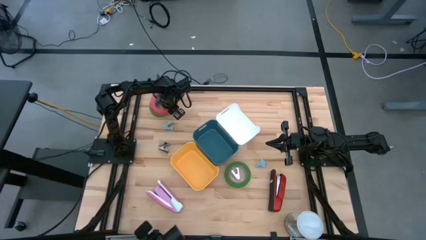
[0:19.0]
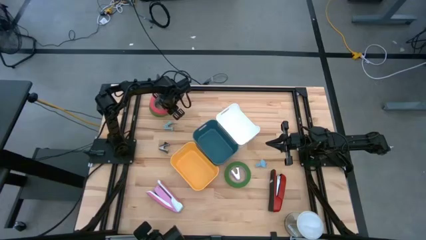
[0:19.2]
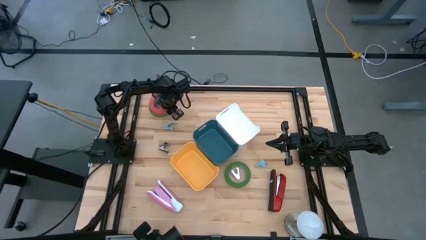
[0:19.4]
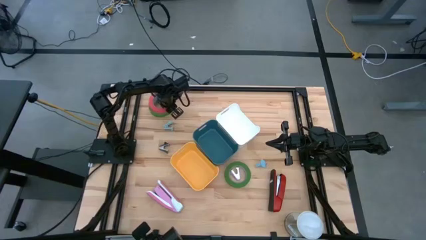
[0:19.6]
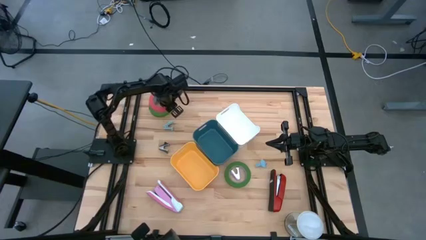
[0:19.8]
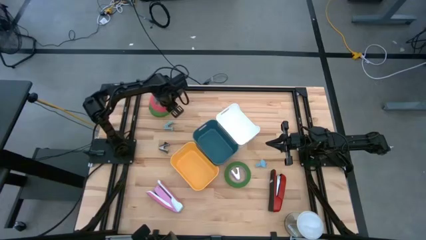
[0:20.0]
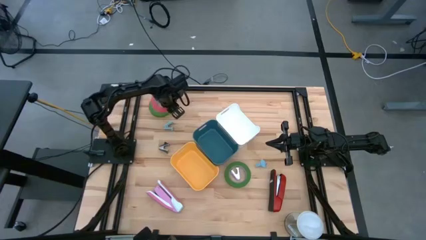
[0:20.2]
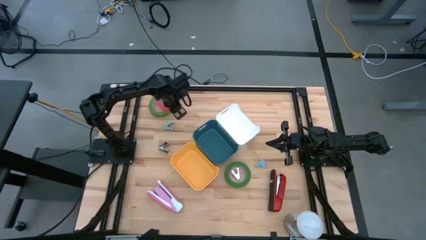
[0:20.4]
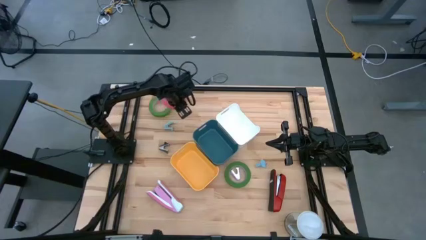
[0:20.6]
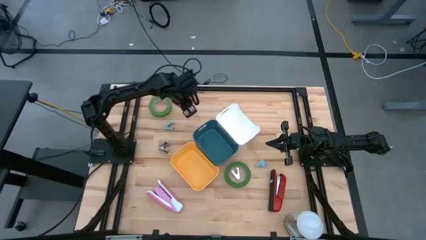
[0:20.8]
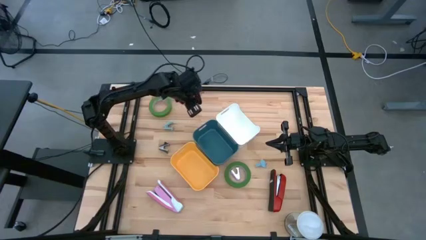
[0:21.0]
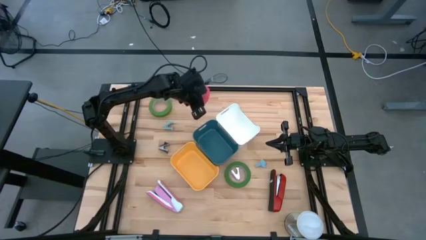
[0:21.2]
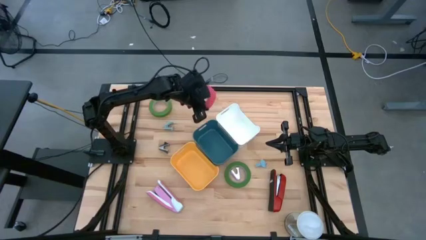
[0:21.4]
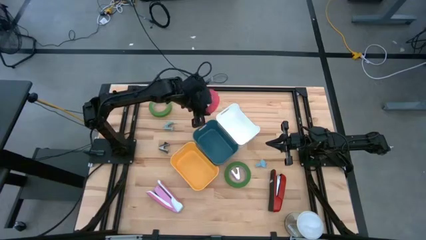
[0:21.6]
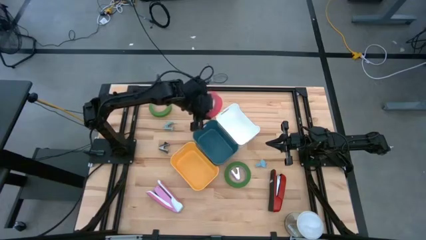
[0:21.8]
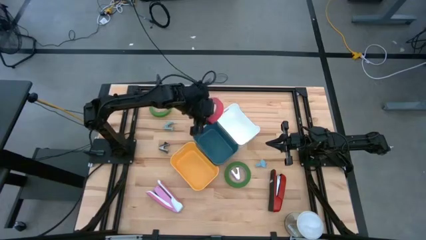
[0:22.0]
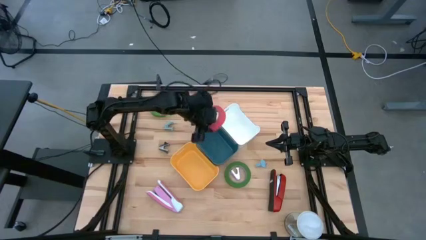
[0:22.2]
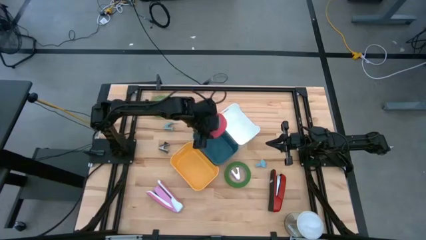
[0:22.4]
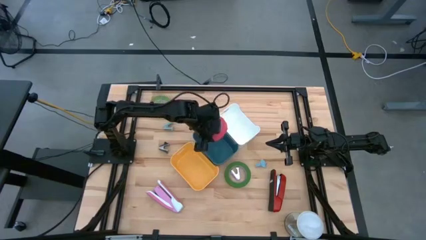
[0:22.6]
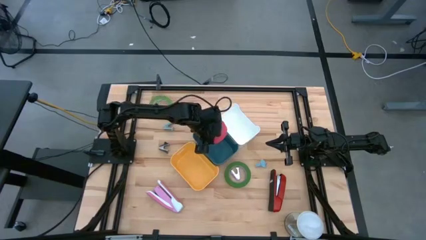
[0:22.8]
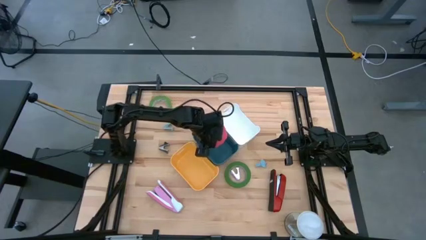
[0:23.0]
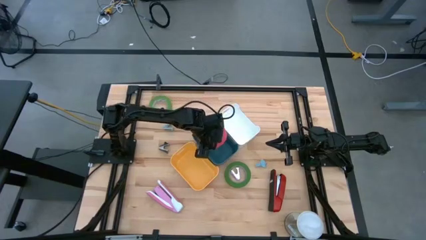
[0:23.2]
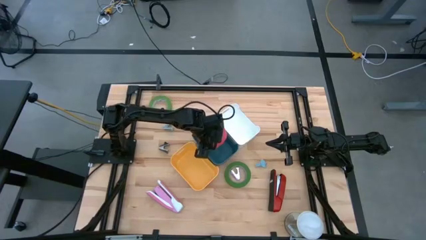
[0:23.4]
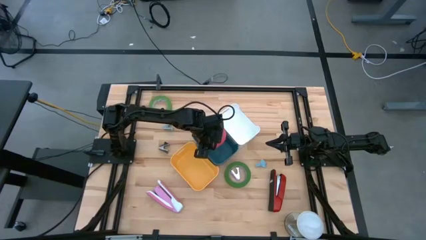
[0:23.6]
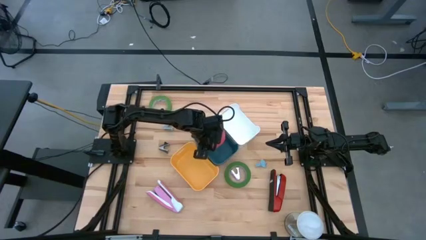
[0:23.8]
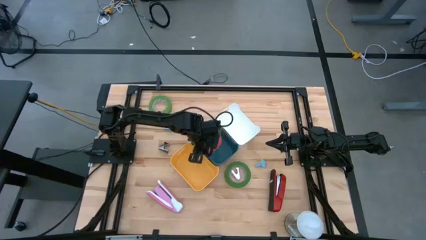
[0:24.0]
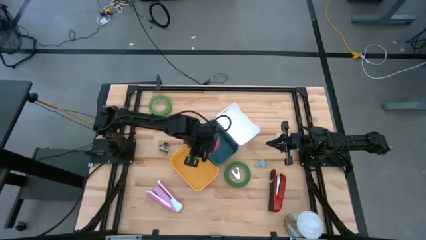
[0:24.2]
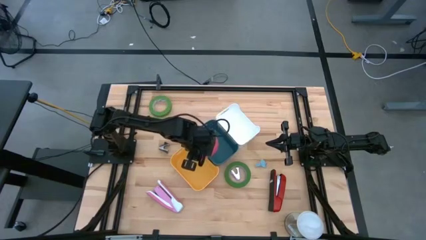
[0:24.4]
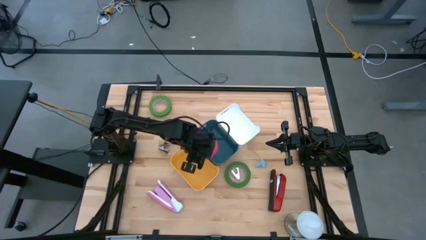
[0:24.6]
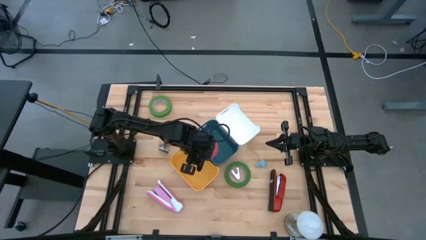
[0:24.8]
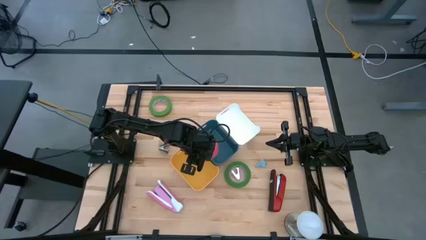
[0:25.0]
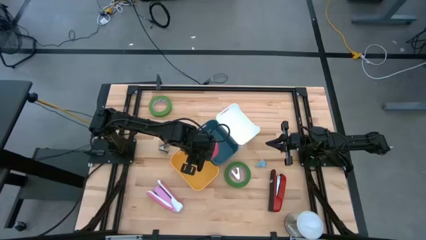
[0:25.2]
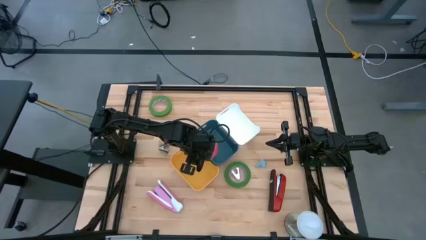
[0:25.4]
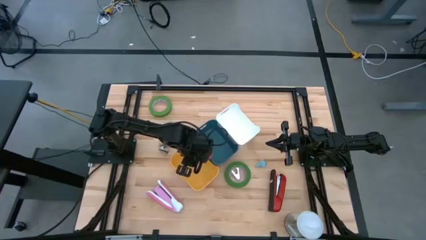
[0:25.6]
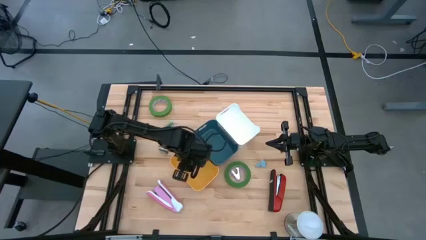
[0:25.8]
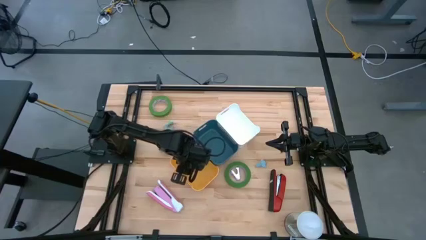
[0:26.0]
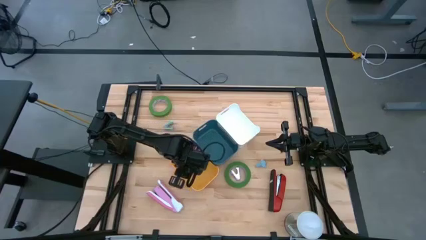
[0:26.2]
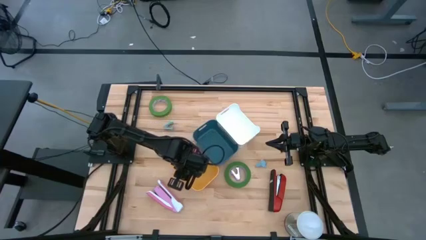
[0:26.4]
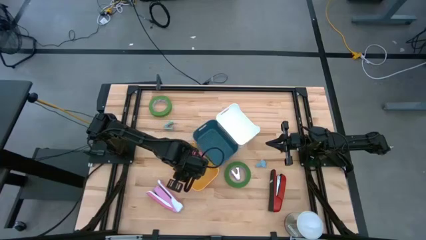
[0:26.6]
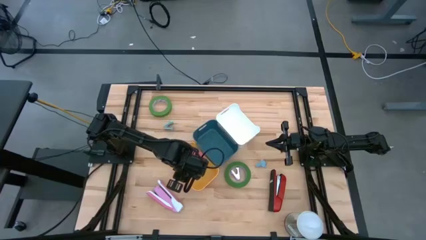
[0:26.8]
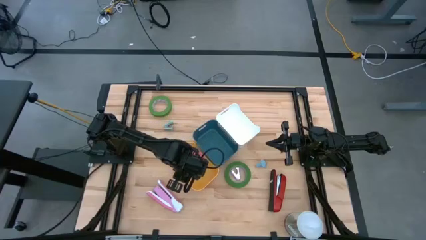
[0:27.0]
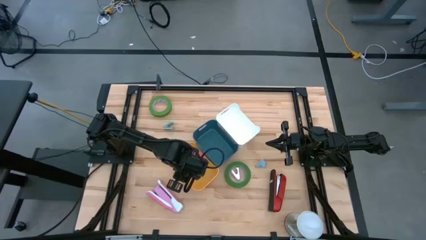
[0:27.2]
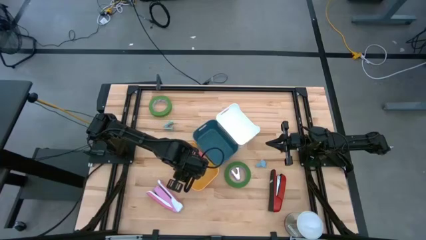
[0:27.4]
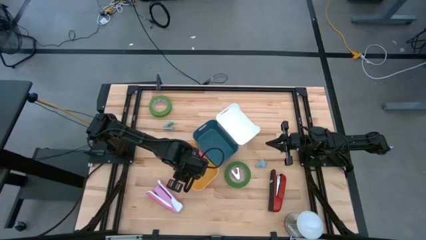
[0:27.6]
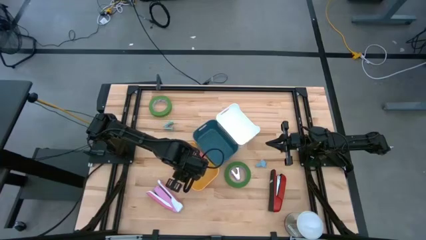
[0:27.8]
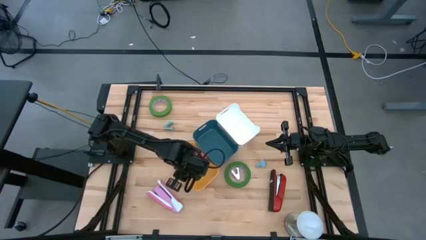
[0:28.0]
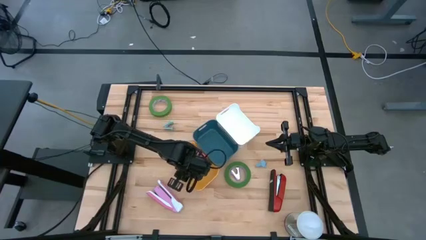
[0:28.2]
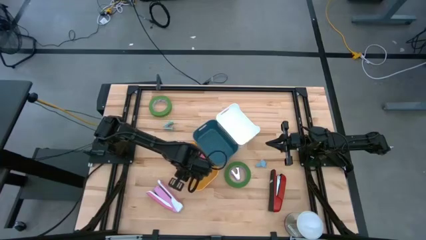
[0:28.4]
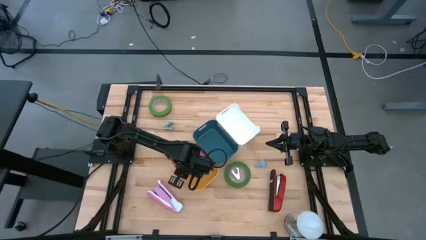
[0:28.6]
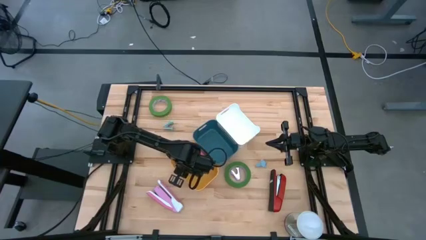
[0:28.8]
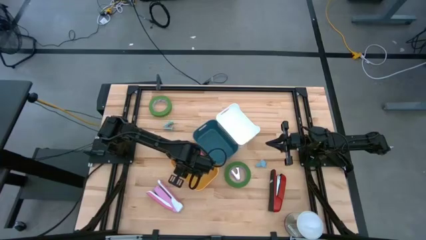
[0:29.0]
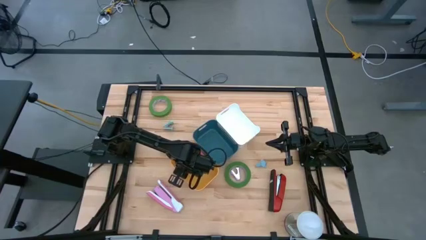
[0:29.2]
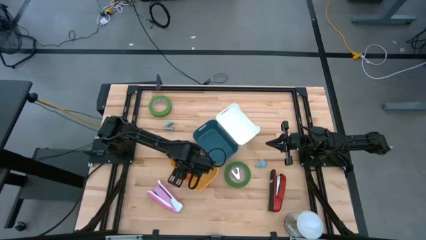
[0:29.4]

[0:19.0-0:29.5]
Task: Pick and place Stapler, Stapler remover, tape
Put the pink tape into the yellow bin
